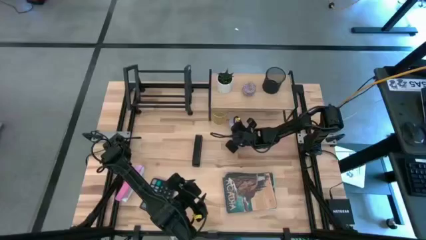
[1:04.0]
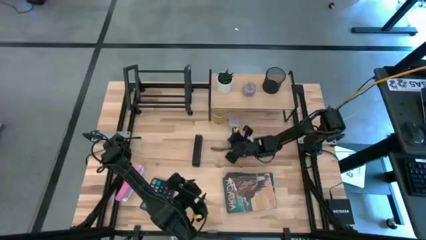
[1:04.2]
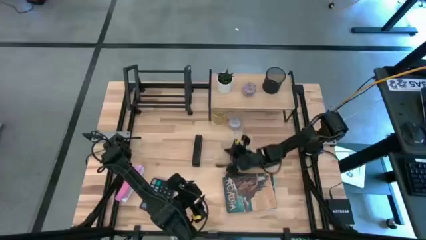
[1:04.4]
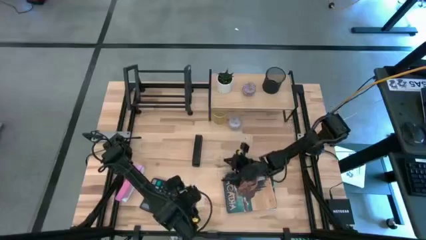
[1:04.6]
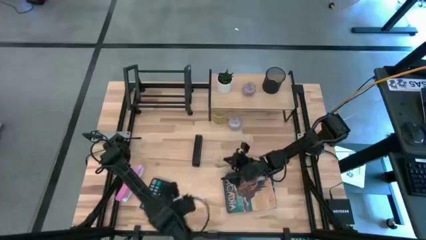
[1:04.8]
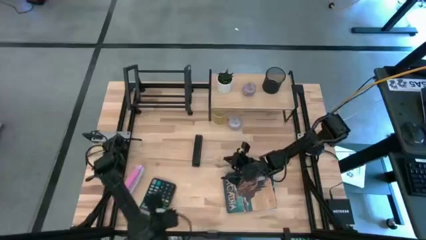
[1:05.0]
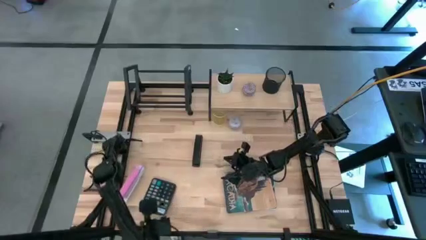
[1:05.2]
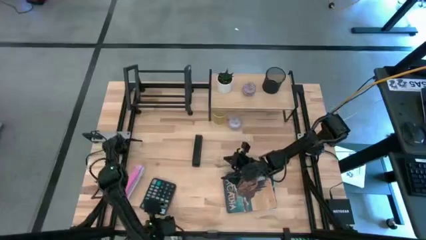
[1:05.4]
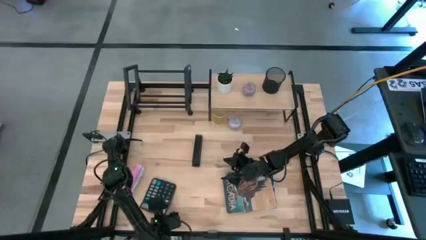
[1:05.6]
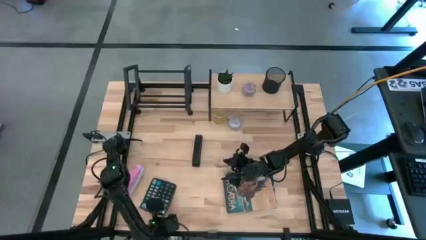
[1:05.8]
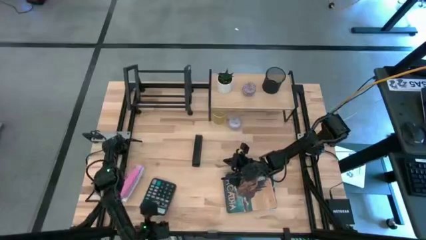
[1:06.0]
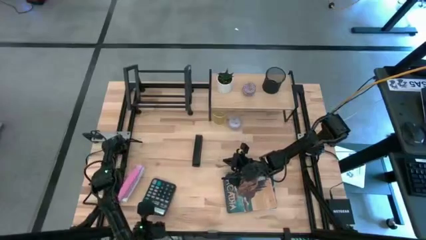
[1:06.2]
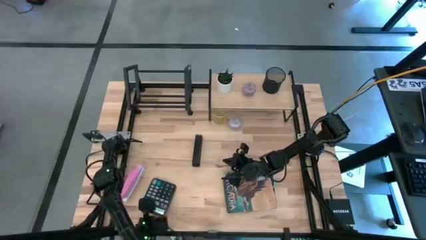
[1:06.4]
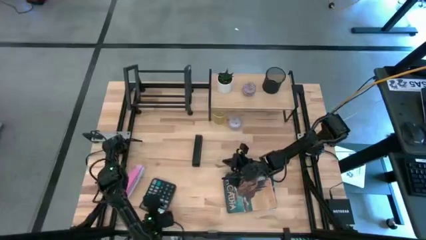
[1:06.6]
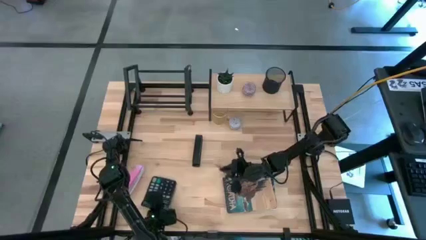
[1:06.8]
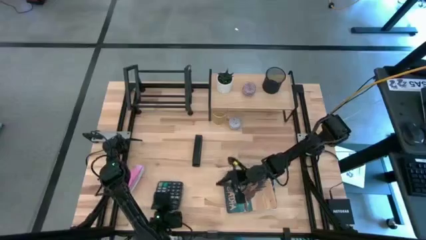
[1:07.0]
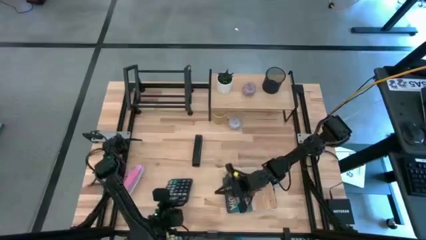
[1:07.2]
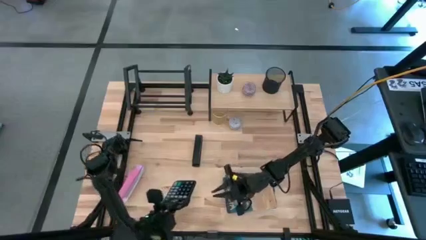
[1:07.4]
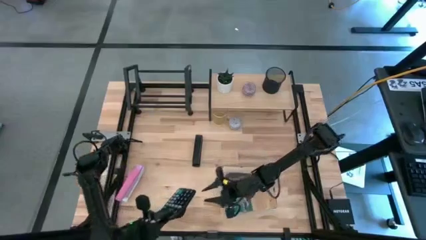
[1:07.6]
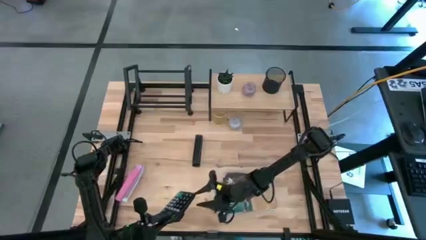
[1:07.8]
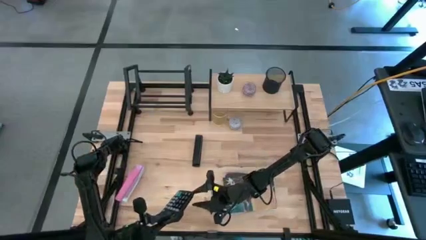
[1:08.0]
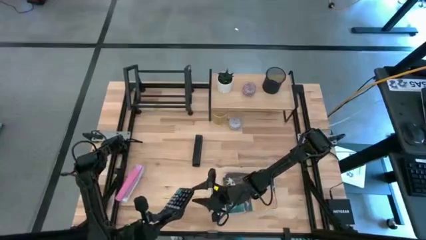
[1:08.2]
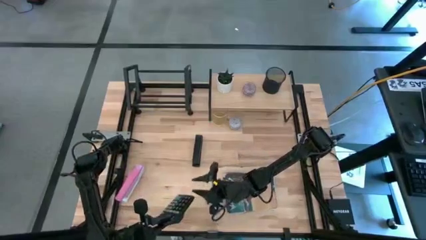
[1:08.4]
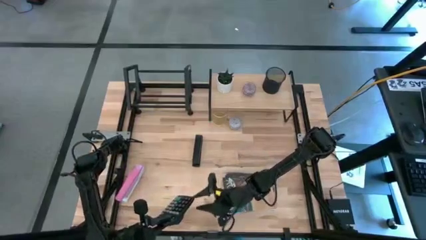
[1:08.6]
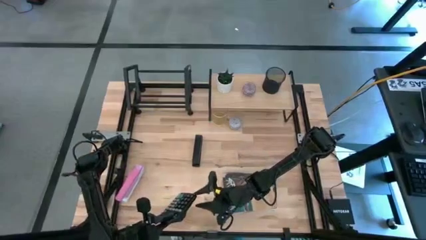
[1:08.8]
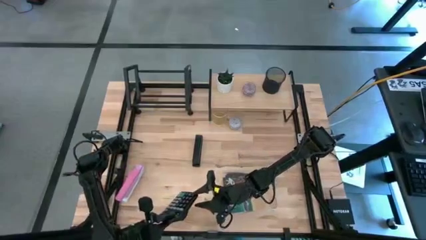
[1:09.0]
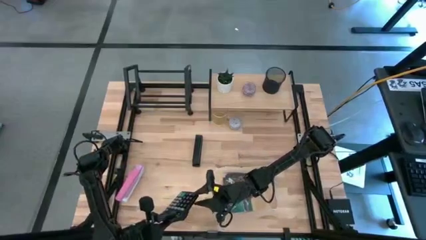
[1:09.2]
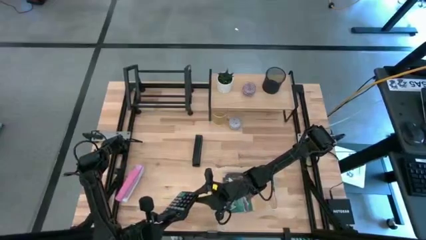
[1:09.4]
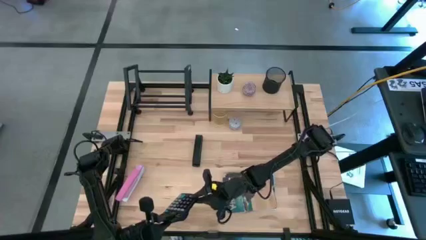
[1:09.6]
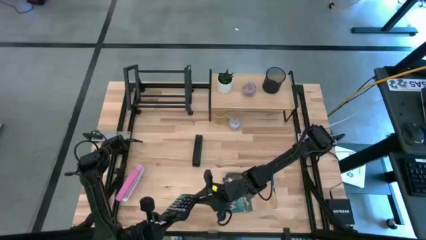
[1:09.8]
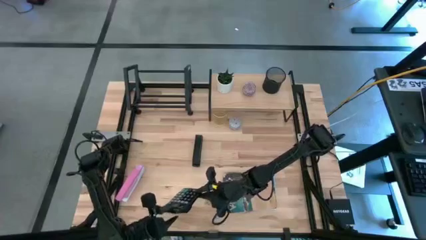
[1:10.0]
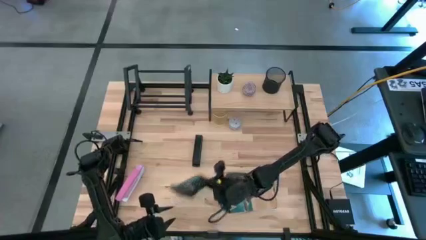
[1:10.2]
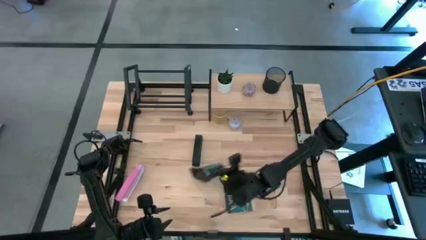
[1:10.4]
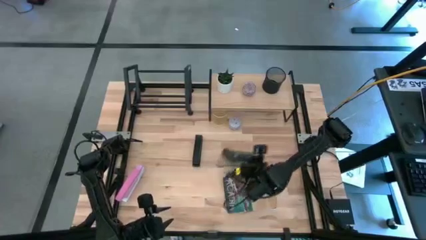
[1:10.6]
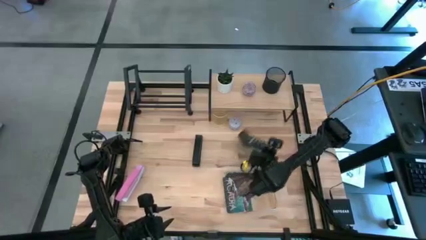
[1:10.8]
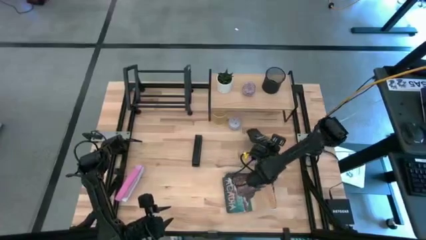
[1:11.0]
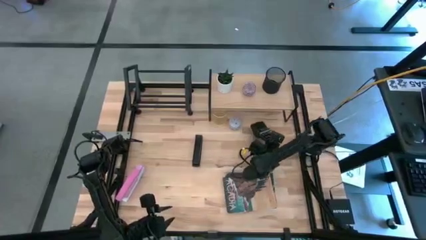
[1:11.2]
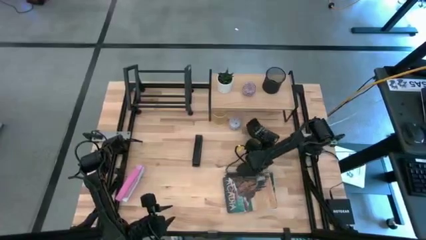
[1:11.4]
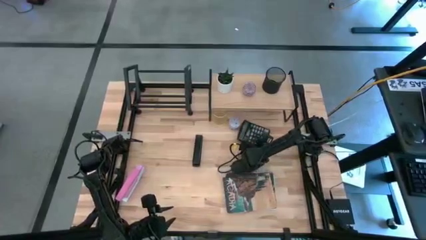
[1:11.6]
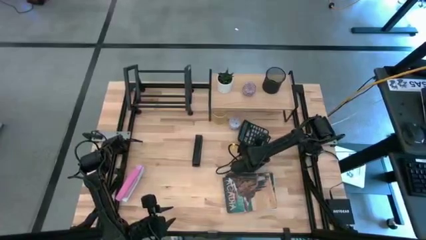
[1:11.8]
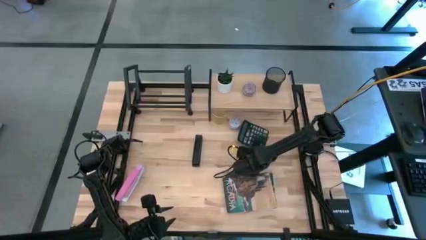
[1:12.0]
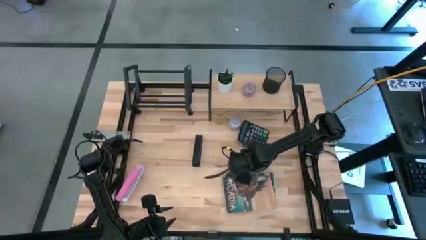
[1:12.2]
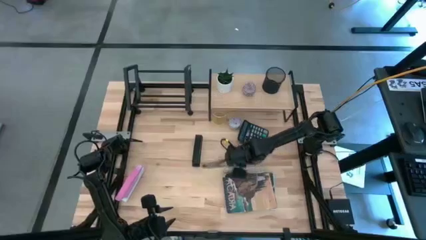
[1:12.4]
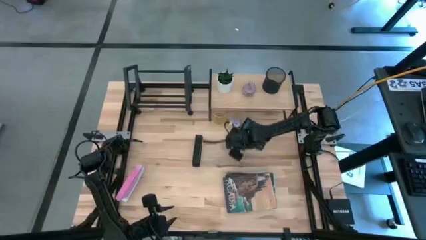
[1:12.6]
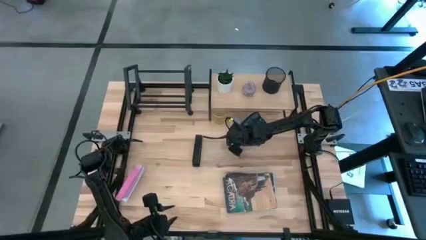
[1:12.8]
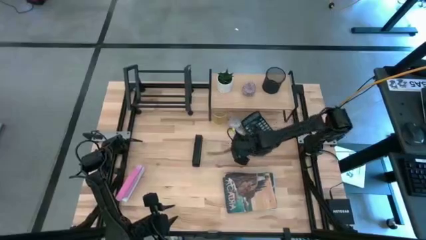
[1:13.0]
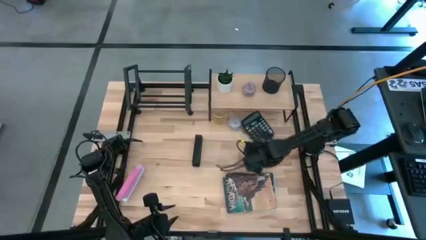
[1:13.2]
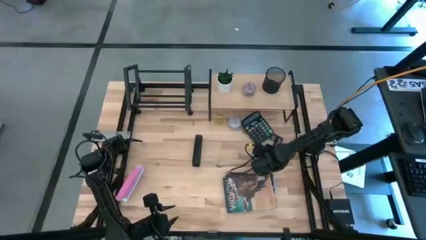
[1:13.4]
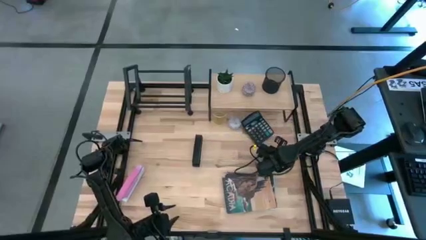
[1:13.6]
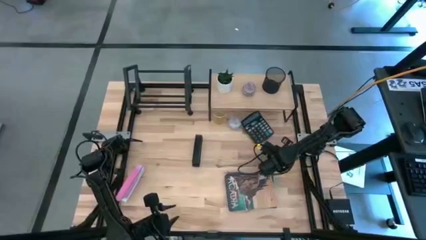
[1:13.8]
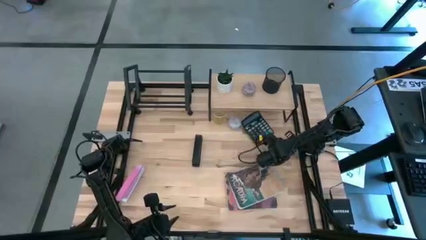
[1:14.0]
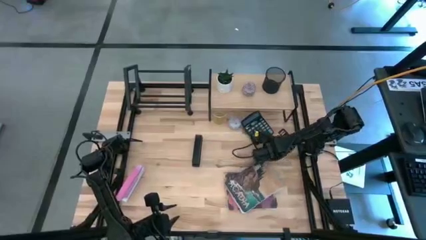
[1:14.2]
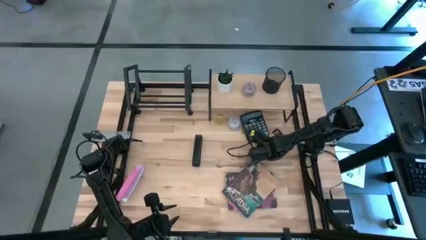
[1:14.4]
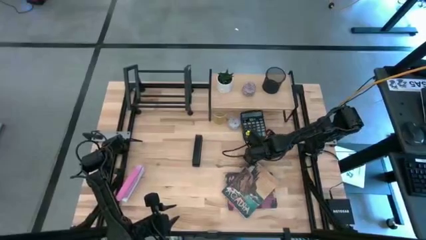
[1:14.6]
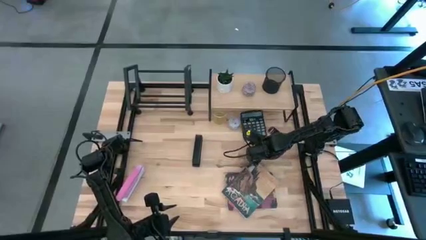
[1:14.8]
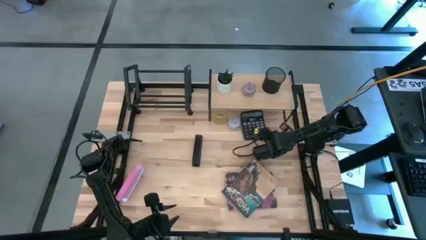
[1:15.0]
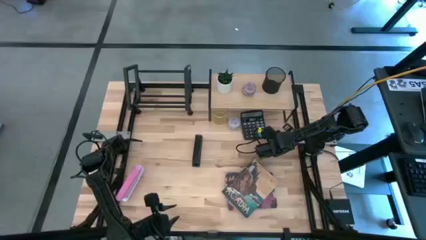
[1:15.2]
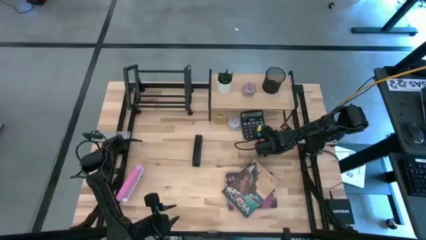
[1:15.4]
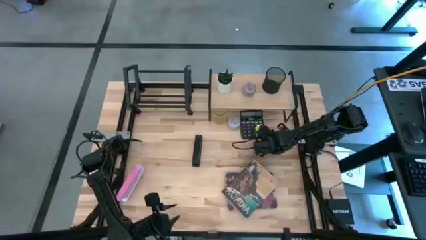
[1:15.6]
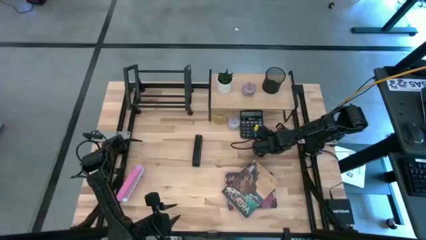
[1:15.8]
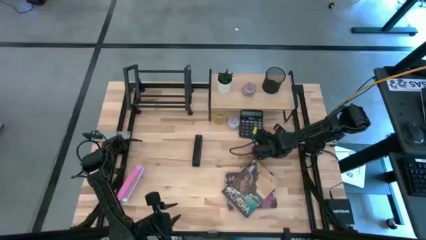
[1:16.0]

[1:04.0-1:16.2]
Task: Stock shelves
Put the calculator under the rack

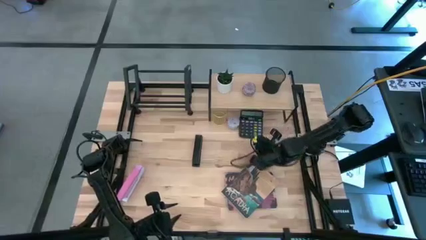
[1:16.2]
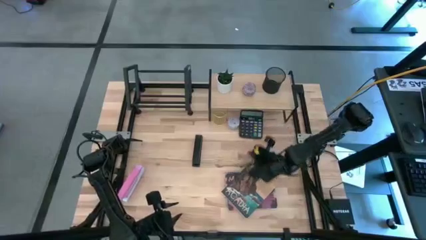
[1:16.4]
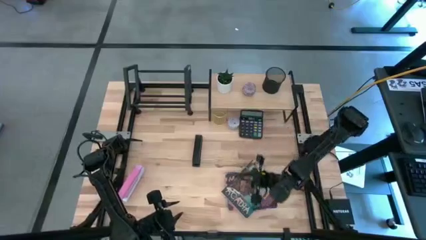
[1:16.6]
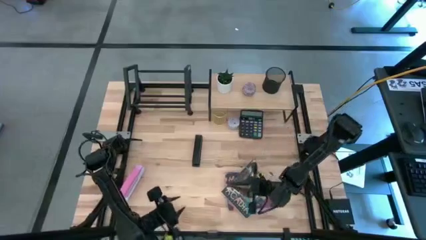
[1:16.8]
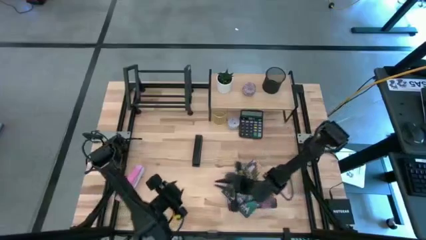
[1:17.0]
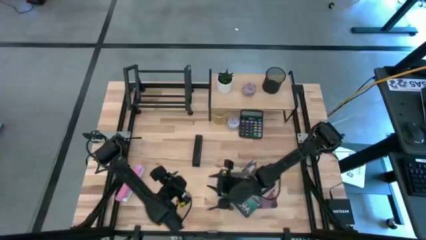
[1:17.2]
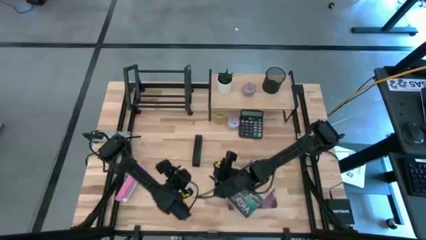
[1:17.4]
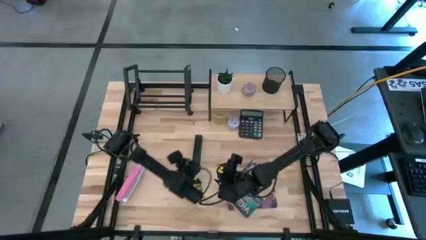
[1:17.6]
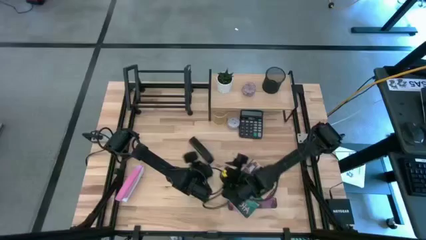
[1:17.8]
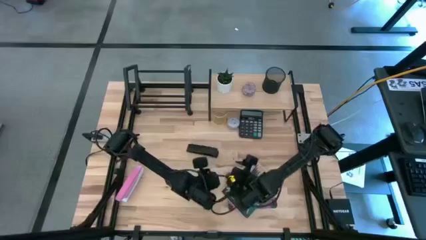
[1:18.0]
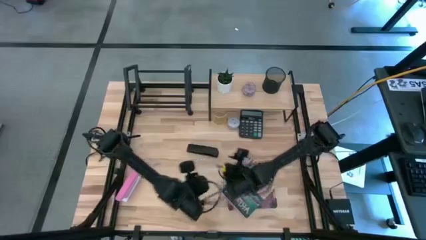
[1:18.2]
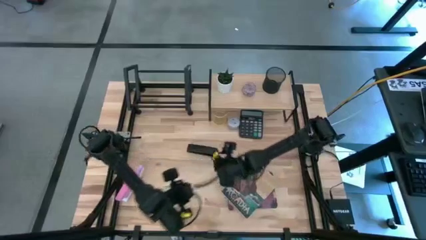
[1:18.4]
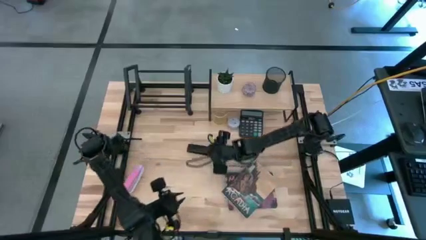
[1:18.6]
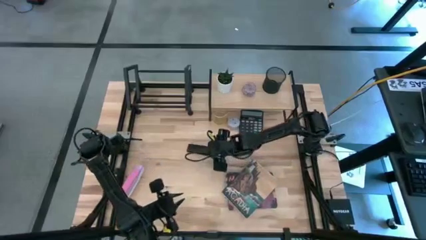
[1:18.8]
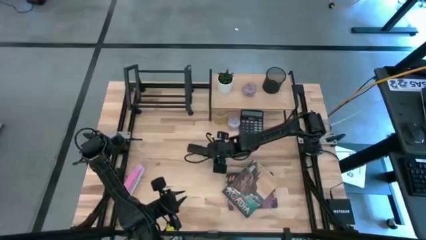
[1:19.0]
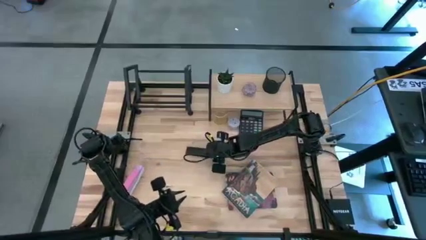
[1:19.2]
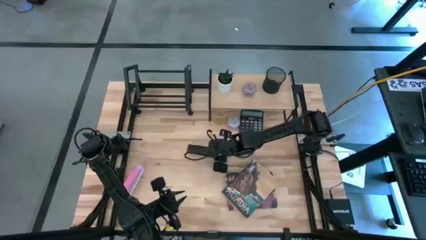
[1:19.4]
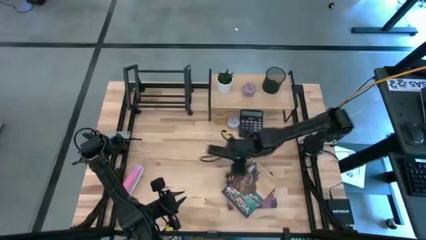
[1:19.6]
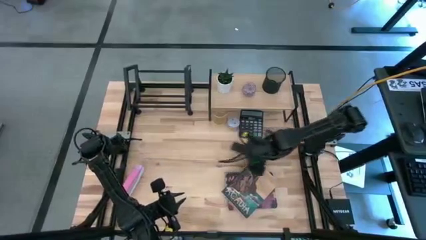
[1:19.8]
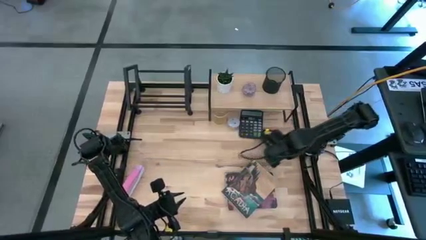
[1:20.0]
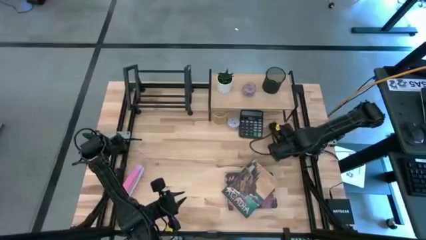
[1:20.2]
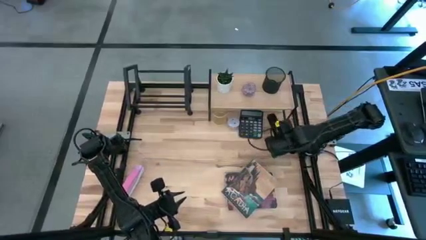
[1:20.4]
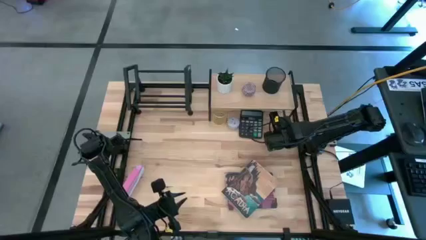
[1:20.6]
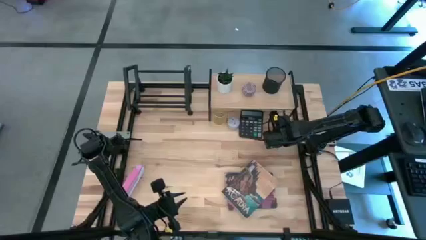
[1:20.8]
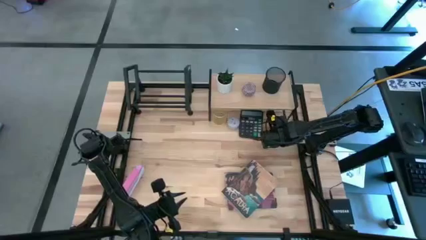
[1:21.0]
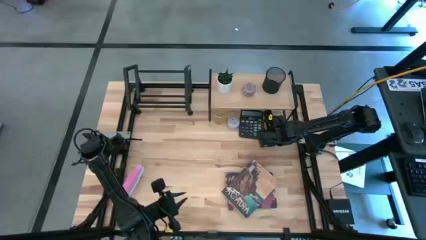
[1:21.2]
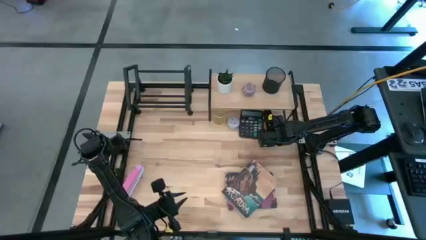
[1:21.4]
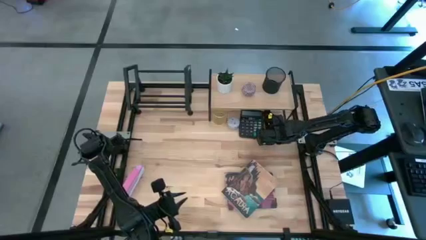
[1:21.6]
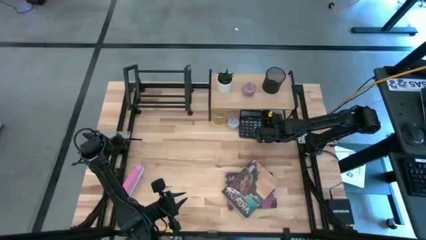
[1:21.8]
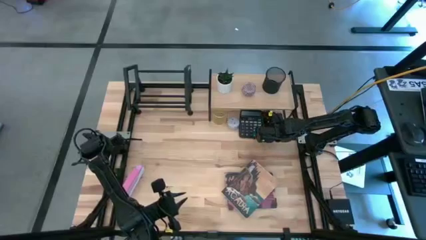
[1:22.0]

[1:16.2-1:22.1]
Put the black stapler under the shelf
